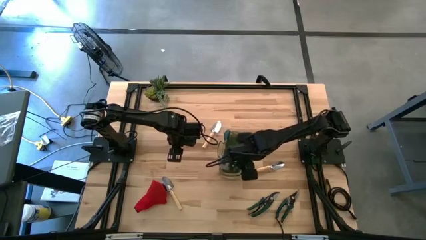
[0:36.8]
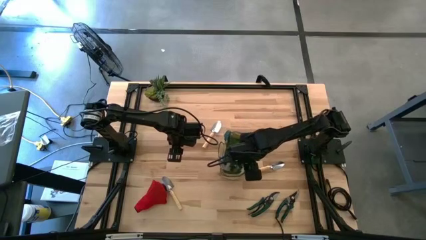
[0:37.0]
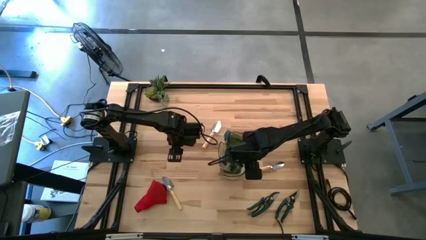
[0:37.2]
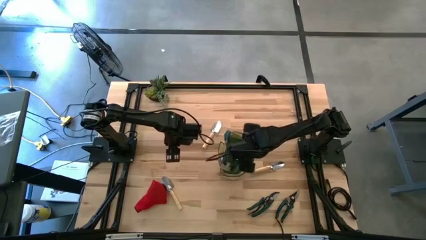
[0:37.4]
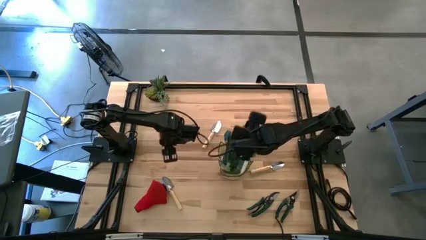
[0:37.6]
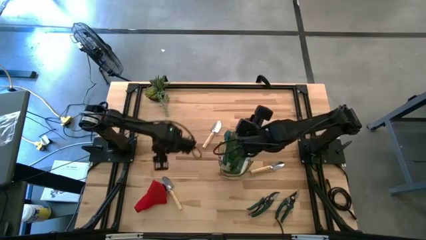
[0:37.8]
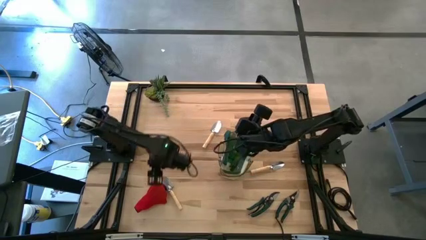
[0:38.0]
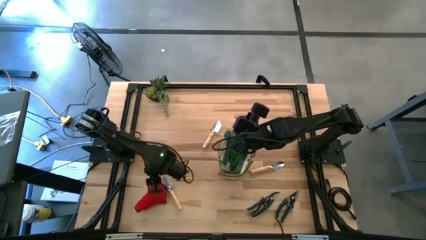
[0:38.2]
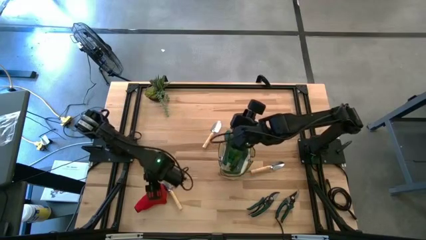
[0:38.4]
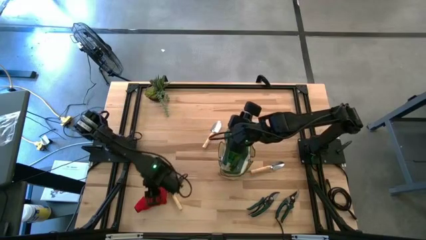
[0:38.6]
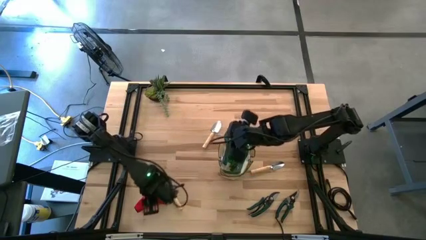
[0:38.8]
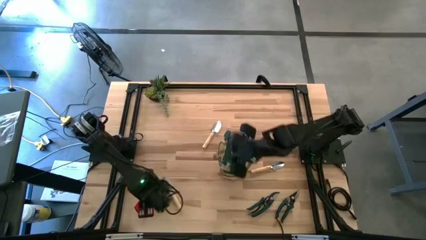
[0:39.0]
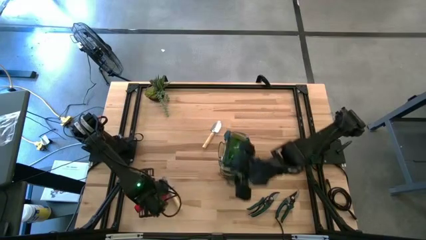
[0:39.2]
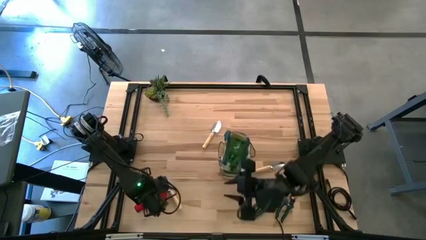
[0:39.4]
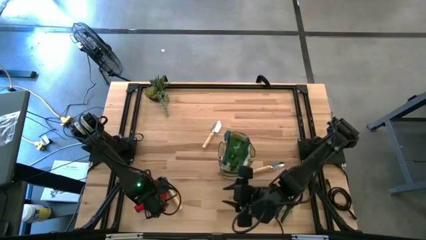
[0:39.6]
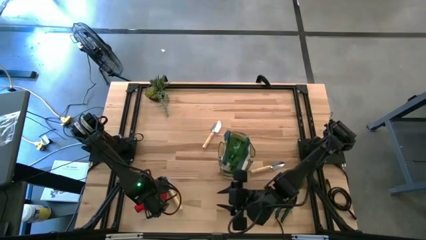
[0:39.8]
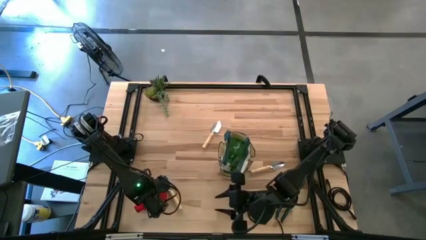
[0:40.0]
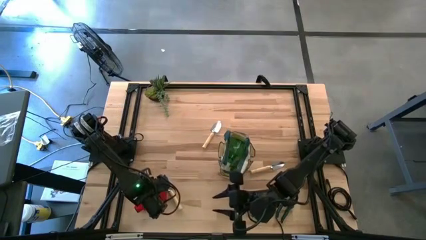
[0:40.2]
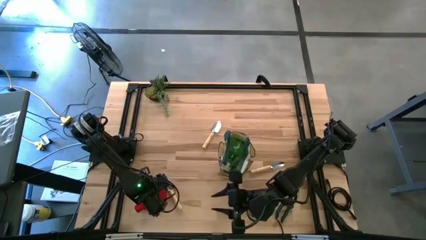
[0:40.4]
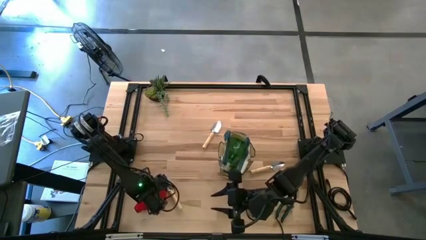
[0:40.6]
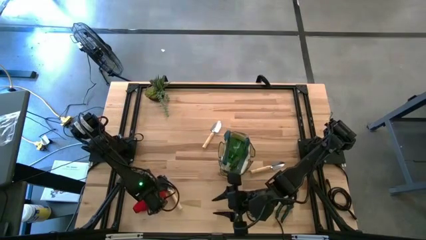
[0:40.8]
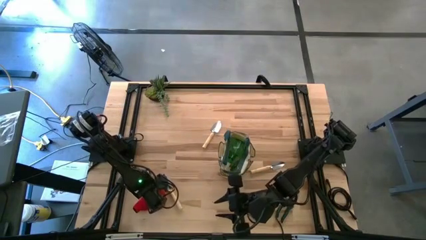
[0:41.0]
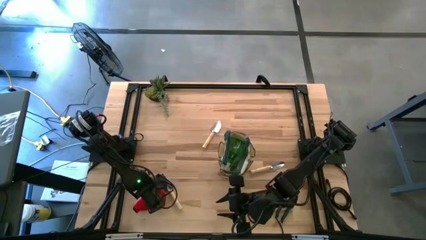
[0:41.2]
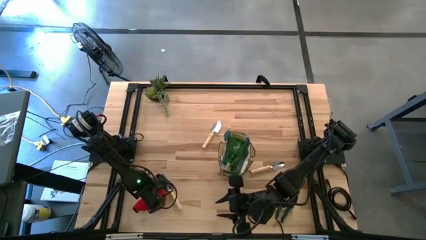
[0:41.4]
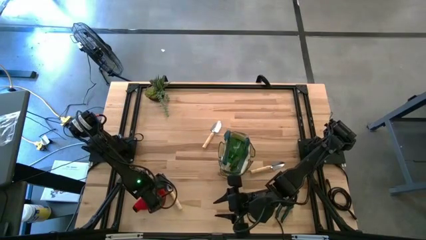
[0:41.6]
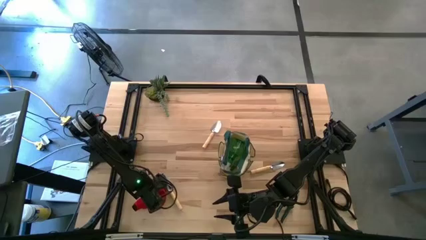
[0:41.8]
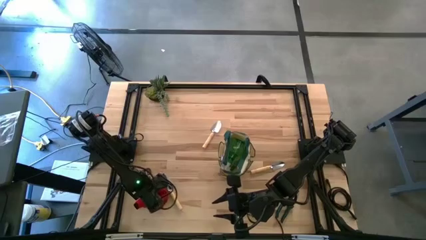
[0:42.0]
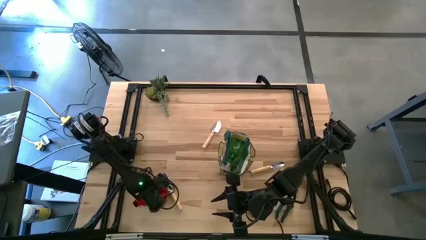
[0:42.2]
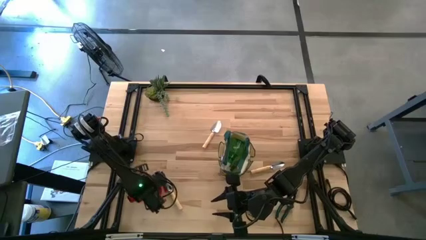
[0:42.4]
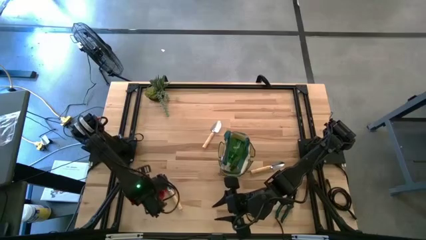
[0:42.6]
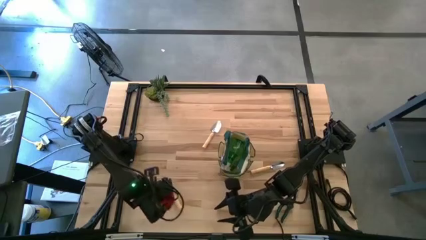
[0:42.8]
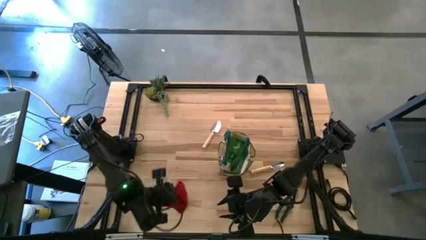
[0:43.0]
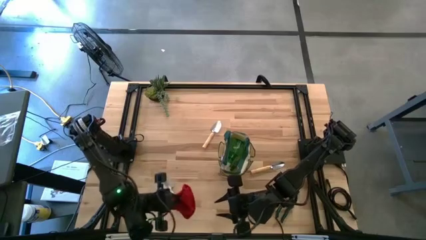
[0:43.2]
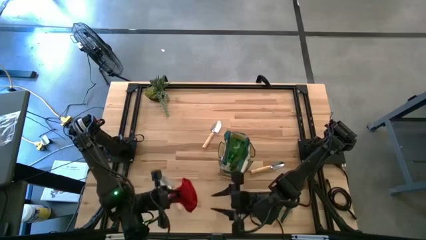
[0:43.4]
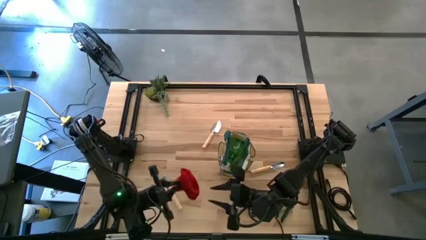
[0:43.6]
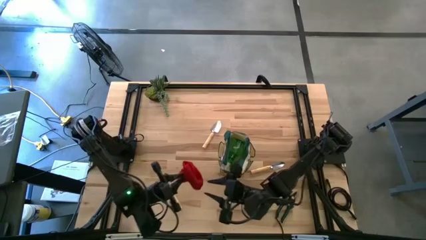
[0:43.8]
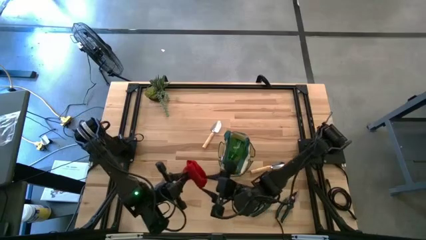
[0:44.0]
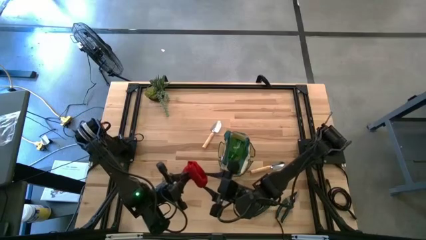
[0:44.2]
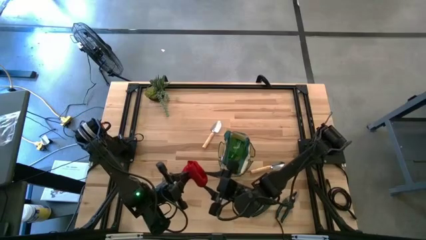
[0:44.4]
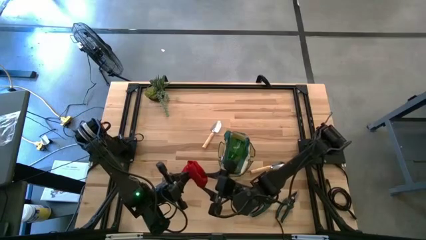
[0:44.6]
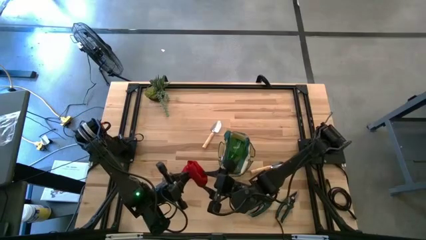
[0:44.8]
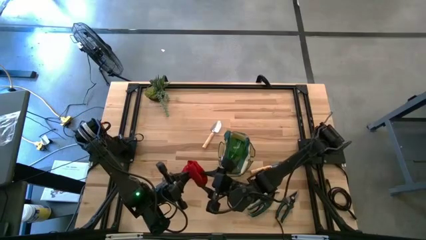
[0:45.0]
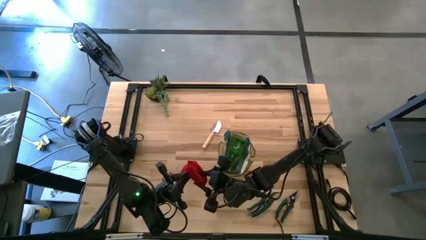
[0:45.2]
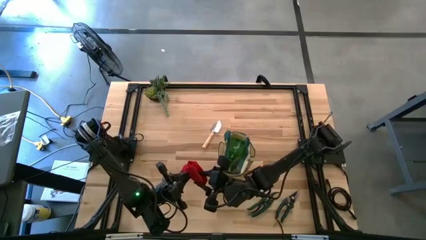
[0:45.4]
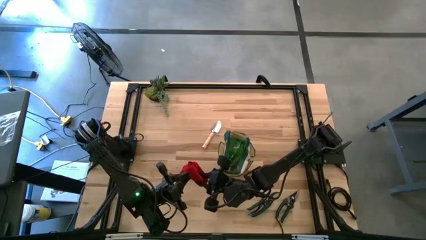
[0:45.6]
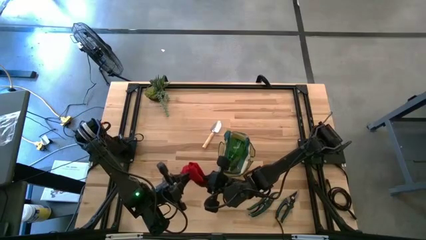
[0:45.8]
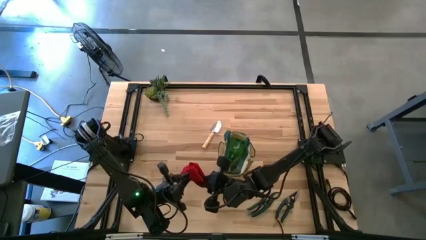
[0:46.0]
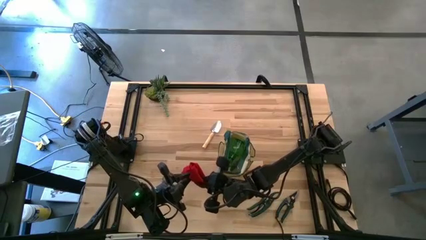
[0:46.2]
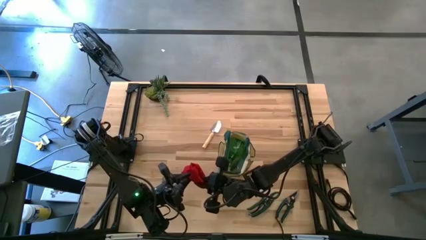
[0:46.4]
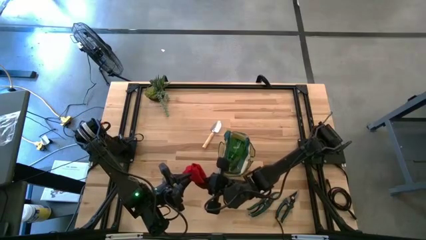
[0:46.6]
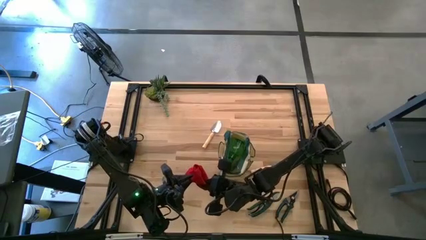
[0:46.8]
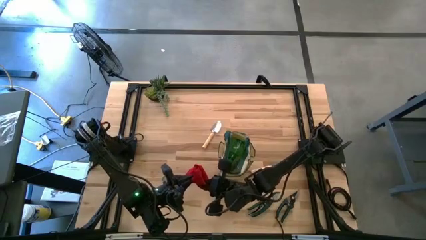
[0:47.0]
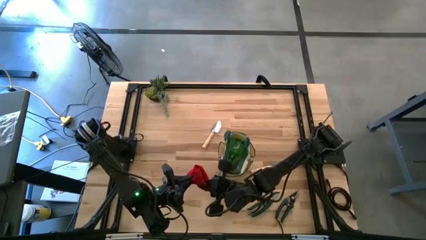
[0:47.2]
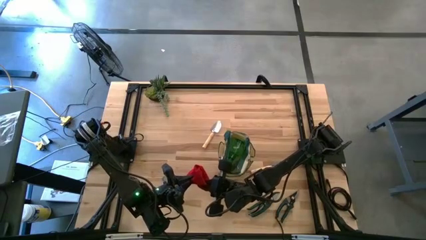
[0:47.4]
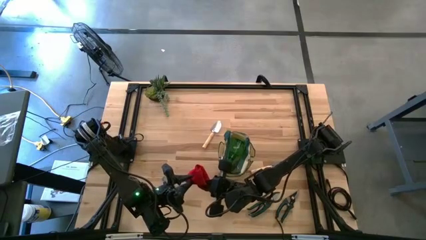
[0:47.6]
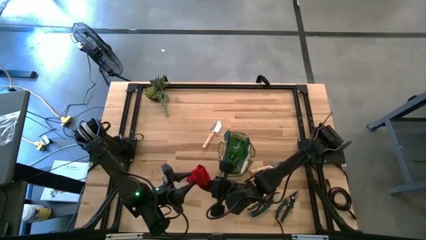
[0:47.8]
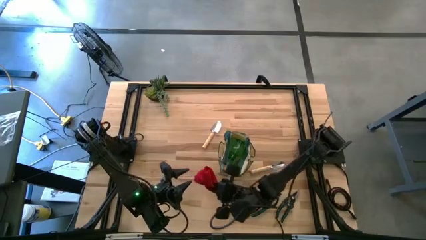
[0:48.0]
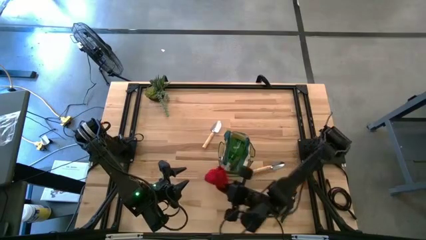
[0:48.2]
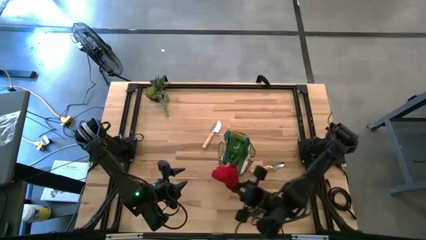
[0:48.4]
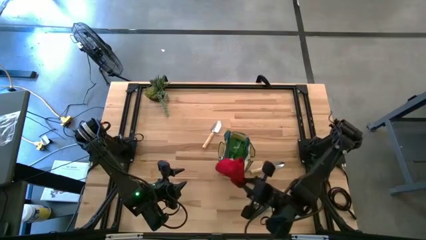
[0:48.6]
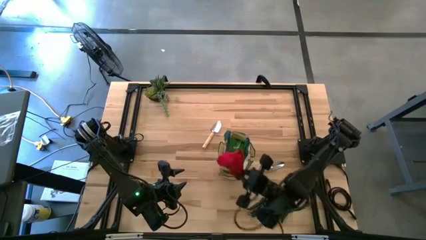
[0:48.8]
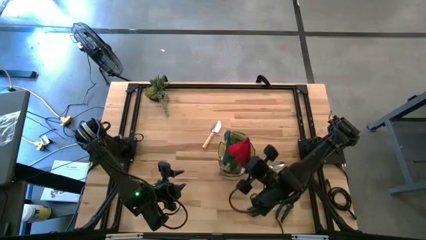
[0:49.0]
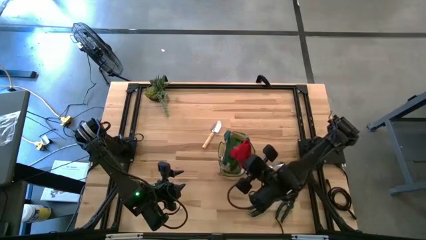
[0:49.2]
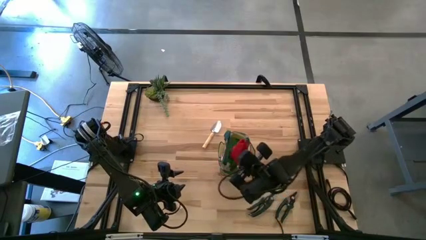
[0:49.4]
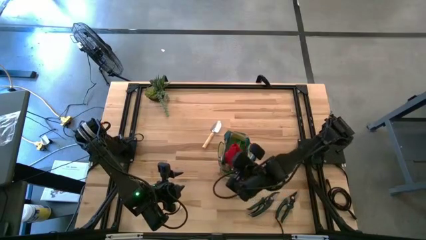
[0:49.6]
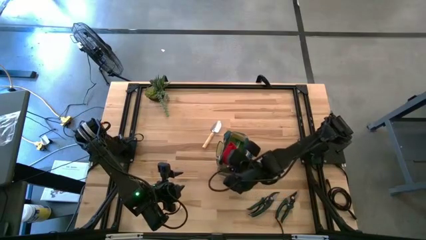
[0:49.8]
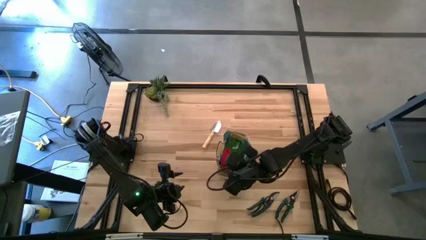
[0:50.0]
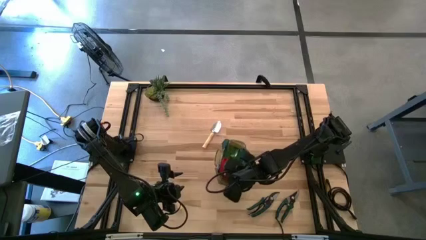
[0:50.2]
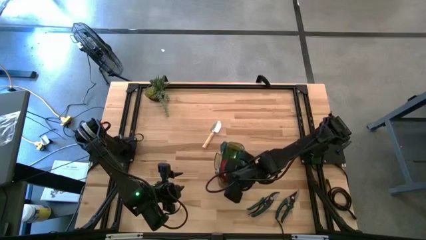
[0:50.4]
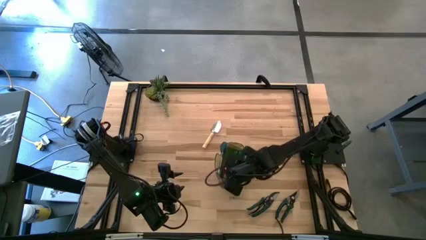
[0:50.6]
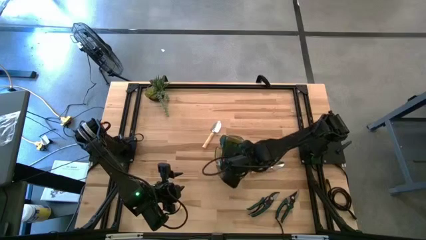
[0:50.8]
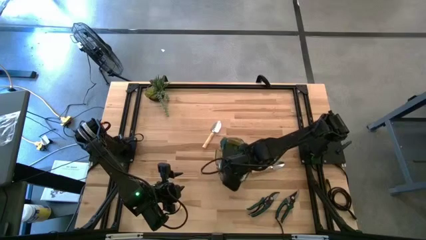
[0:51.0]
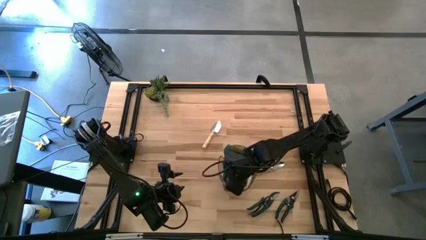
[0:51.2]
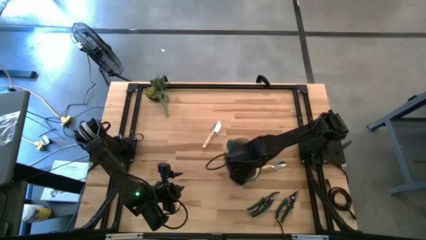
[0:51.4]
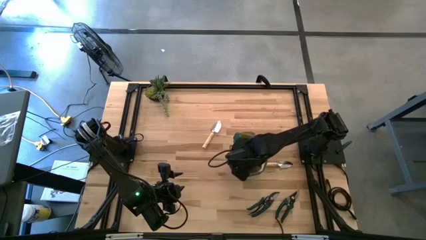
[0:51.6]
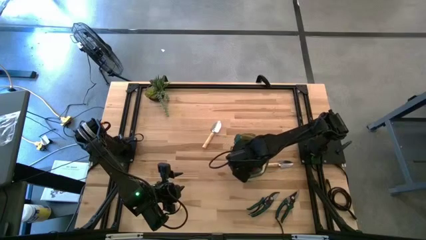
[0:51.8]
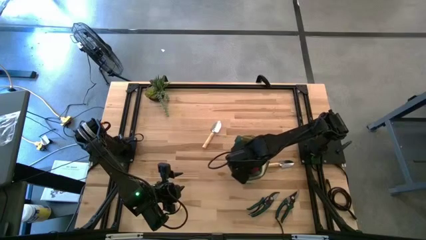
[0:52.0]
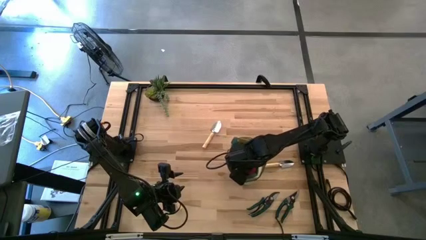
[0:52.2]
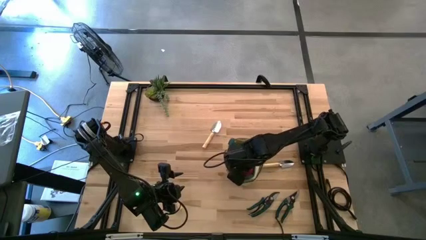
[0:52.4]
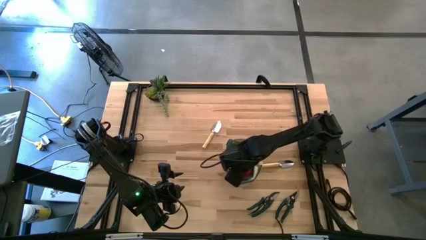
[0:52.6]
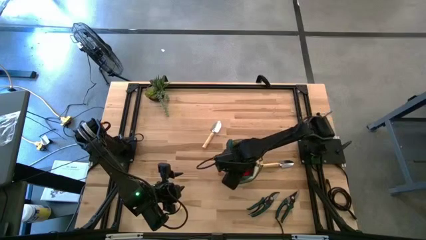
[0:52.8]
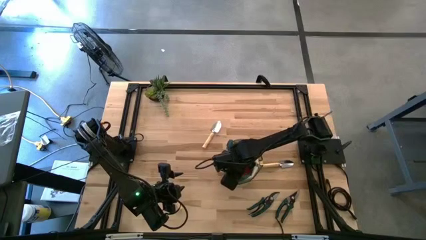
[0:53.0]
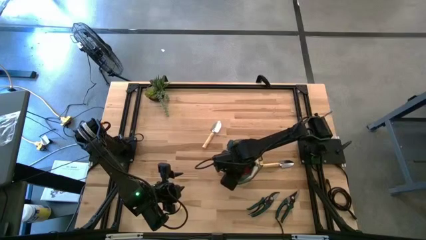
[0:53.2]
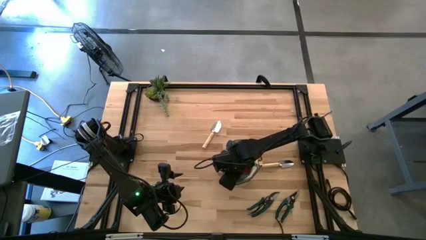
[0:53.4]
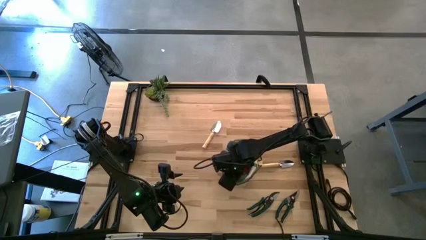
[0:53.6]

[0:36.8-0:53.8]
Task: Pick & Place Garden tools in Gardening bag
Put the red glove into the light brown gardening bag
